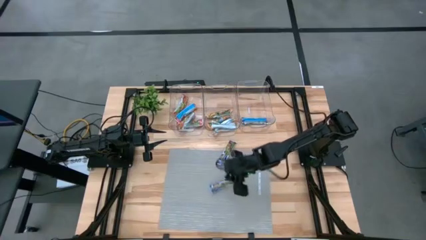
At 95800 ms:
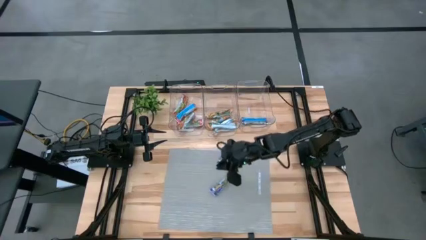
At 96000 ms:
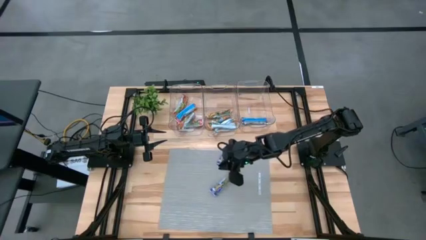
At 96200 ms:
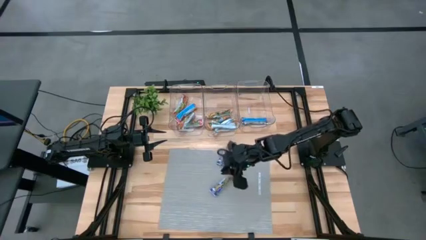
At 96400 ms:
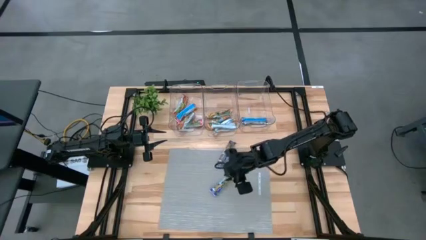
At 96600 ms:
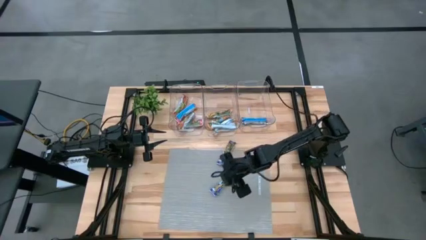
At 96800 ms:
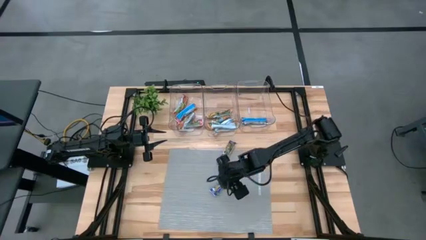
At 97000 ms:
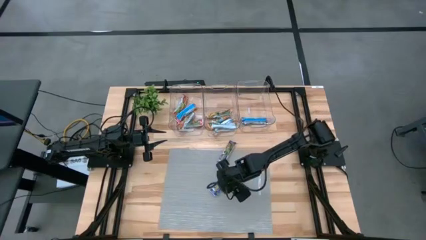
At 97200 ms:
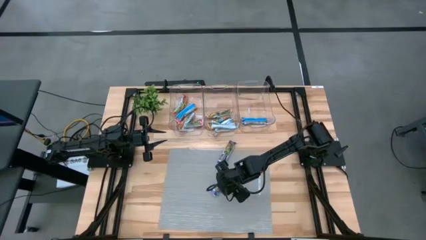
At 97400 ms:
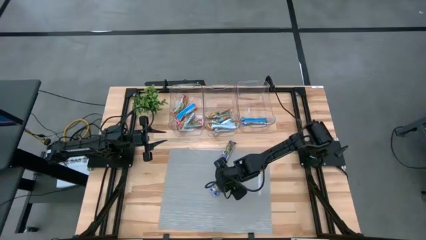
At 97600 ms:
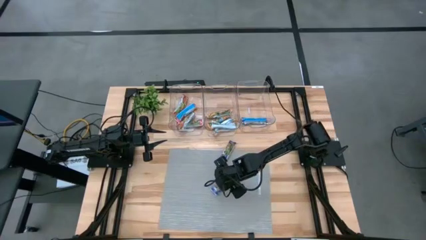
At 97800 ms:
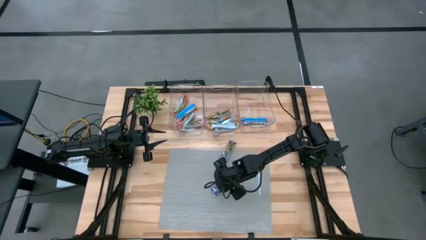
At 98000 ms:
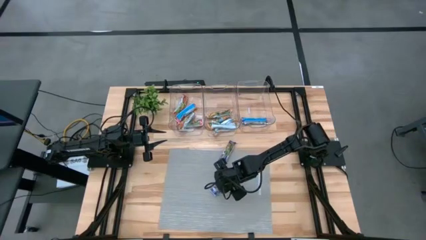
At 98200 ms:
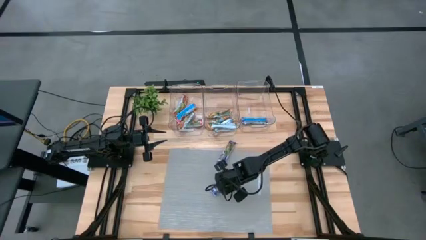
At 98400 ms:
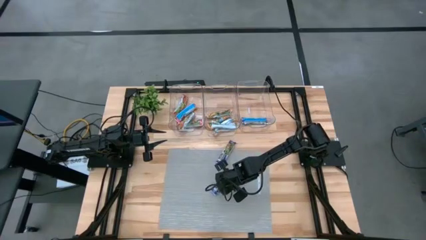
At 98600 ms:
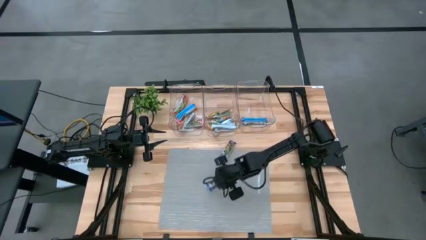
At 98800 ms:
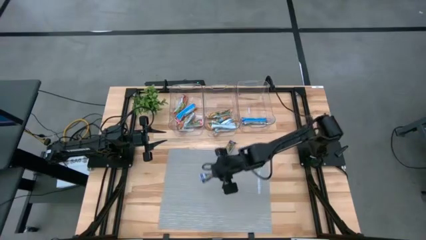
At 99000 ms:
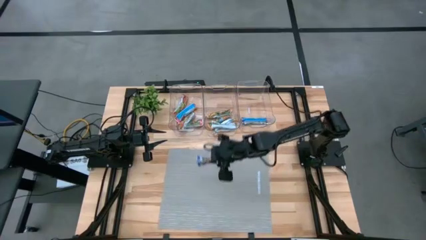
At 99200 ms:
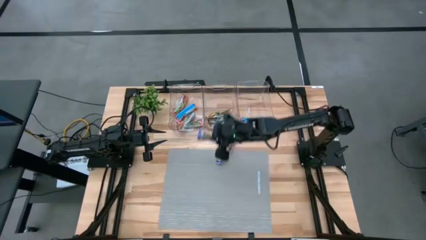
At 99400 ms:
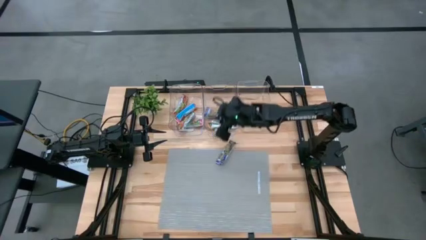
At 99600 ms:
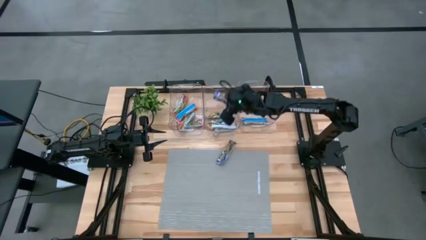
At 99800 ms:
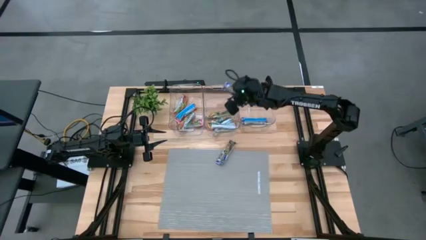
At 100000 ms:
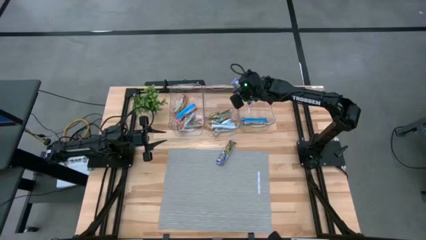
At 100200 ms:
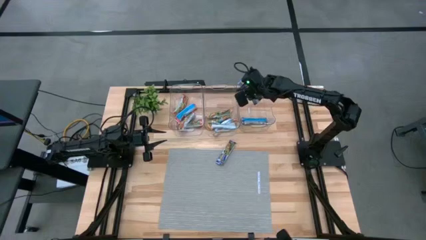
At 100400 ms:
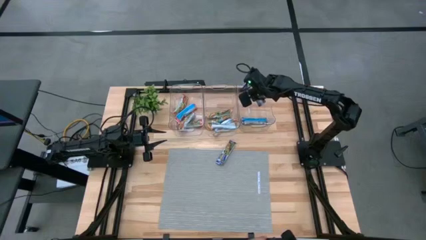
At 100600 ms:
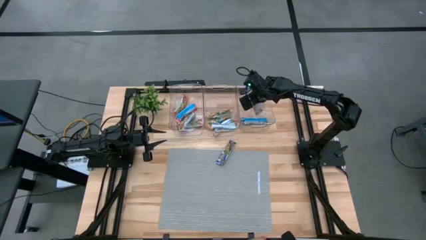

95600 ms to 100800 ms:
Task: Pick and place Granola Bars by type
Put the blue granola bar into the right transparent bin

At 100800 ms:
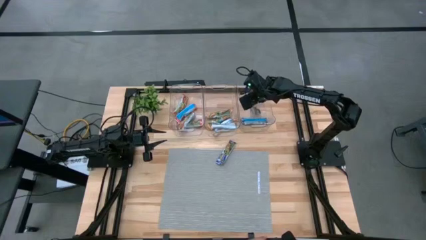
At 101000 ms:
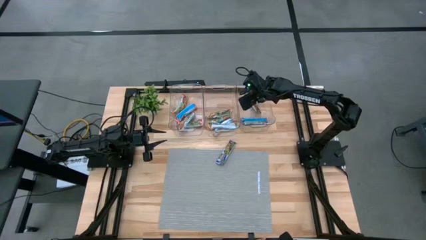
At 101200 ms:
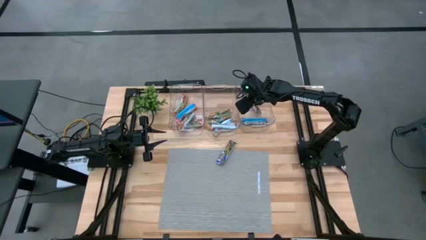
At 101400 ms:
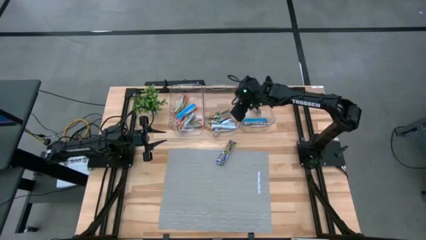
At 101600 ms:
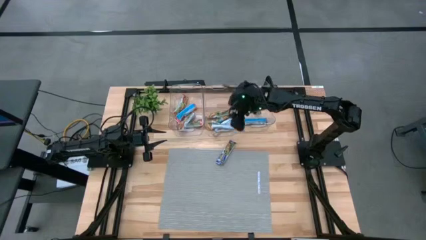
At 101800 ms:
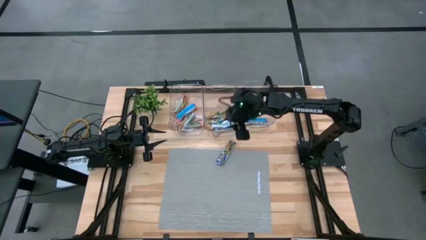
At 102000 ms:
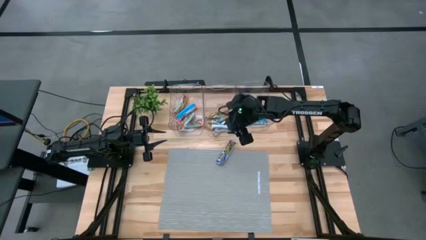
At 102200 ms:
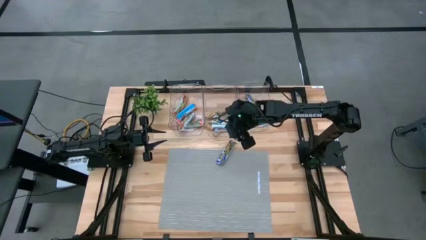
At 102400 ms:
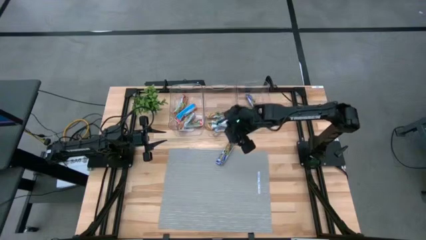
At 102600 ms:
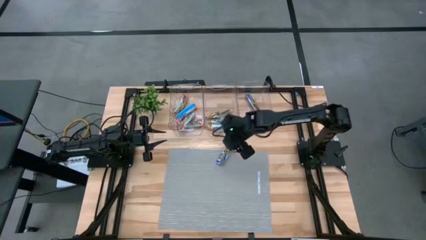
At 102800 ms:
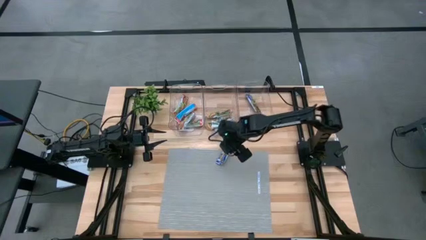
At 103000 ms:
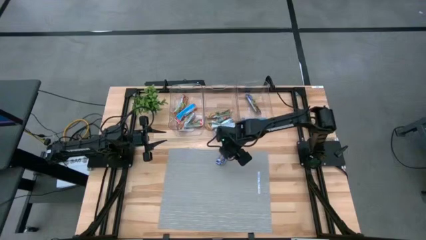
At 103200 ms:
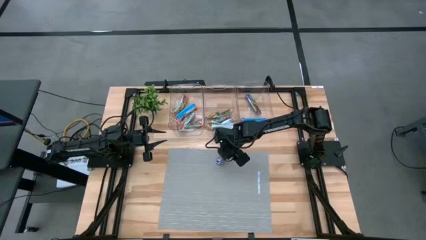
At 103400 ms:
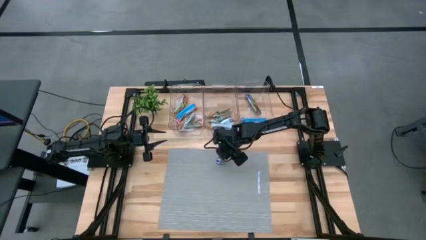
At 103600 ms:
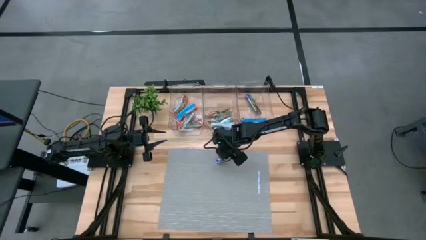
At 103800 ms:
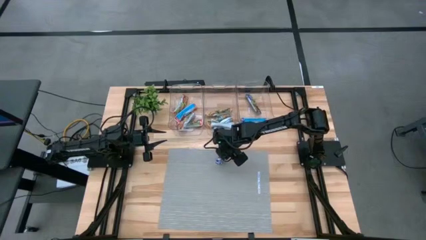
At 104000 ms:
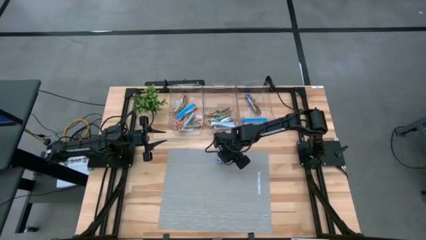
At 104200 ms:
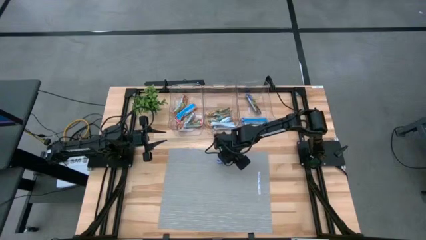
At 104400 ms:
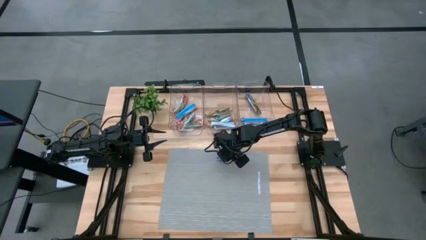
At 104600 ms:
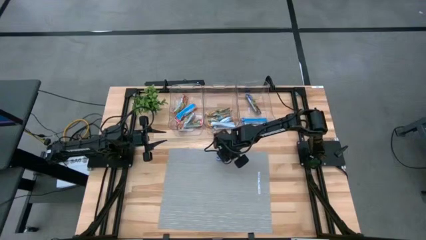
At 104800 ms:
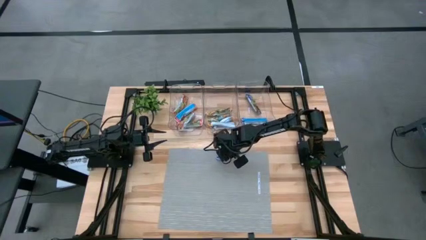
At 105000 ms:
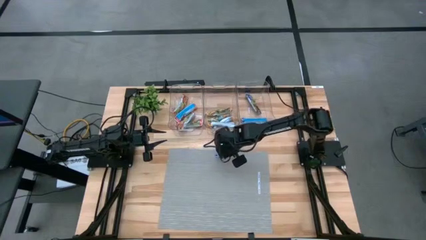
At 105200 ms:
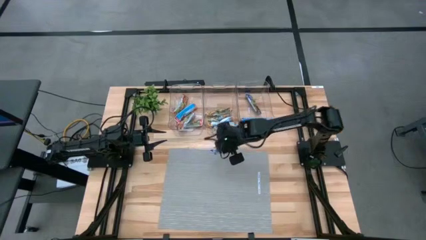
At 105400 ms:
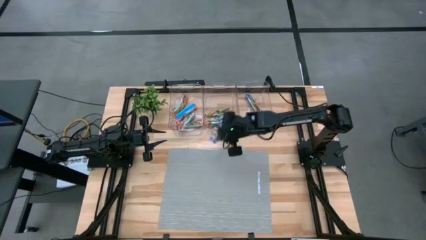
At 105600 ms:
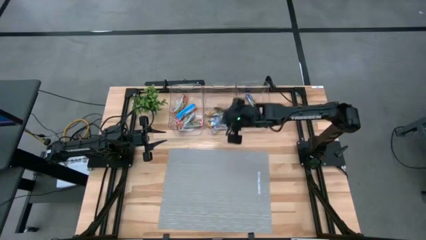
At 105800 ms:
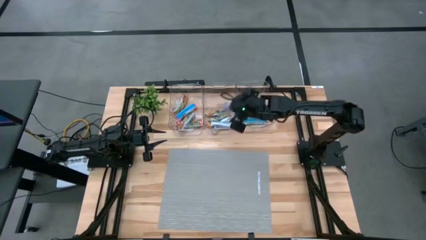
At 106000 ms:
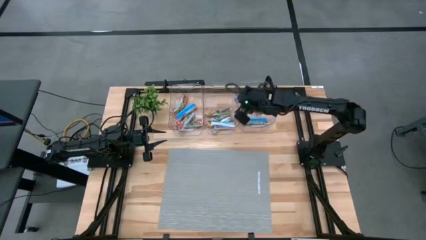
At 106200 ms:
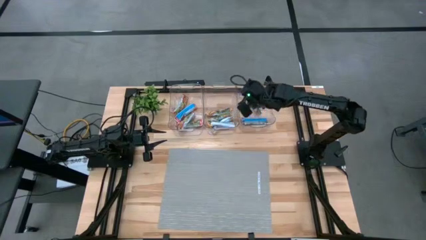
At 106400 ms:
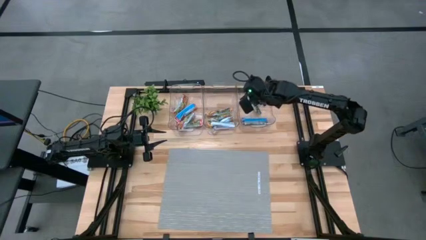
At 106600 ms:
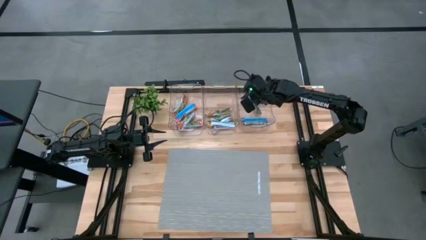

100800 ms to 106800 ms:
Put the blue granola bar into the right transparent bin

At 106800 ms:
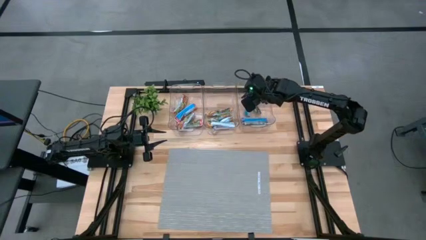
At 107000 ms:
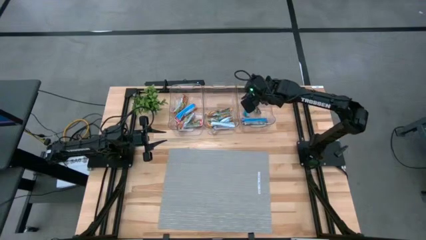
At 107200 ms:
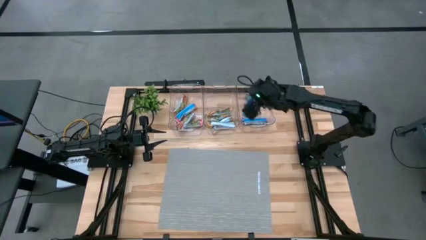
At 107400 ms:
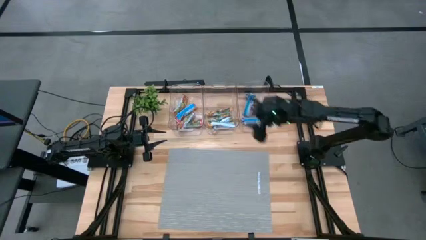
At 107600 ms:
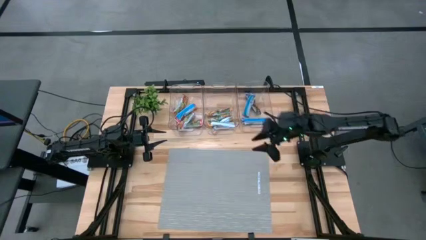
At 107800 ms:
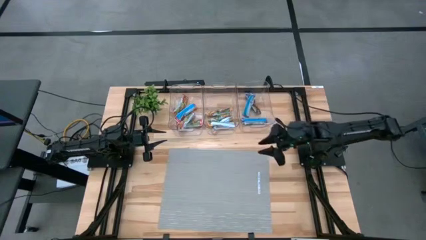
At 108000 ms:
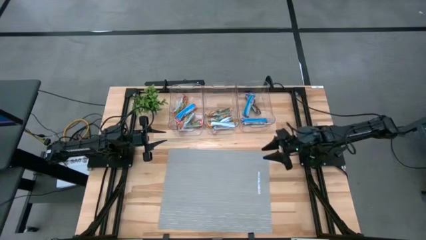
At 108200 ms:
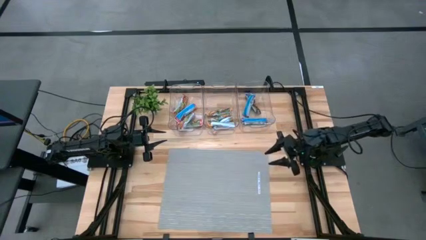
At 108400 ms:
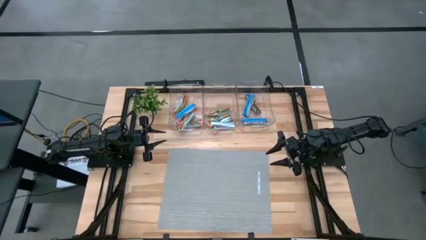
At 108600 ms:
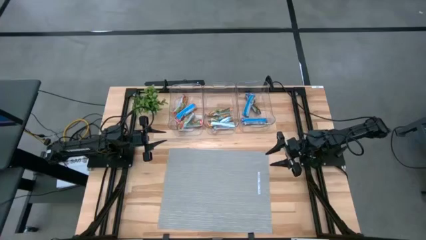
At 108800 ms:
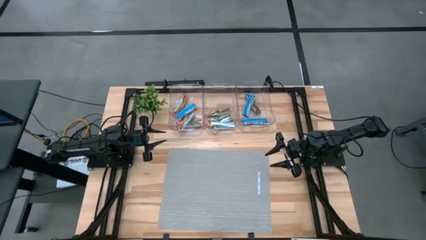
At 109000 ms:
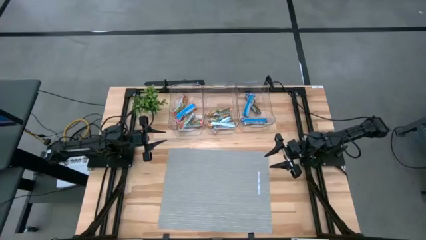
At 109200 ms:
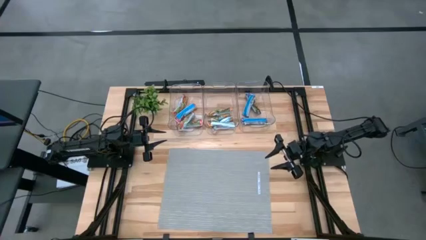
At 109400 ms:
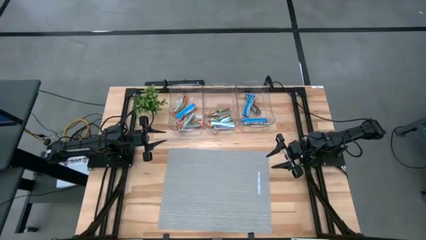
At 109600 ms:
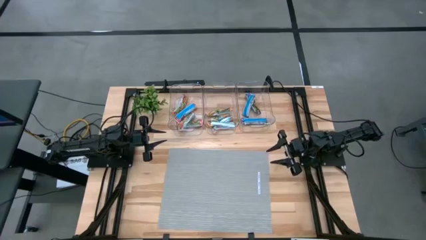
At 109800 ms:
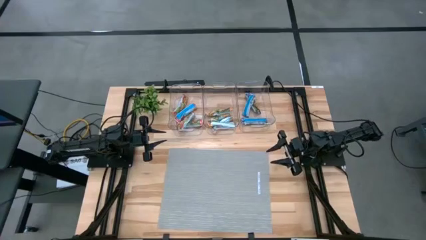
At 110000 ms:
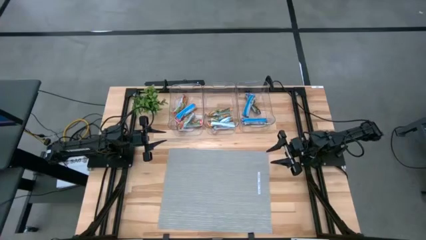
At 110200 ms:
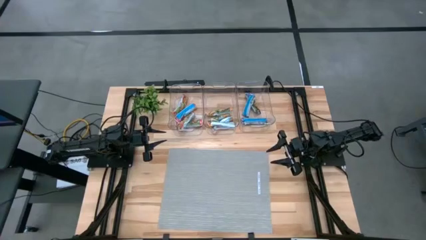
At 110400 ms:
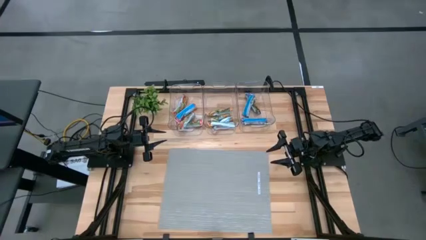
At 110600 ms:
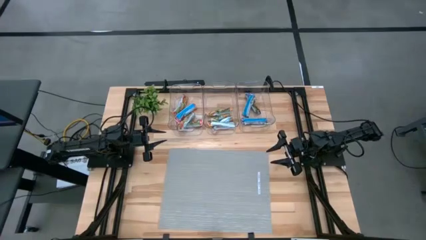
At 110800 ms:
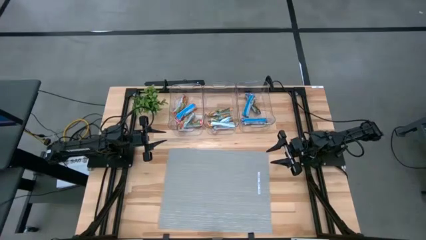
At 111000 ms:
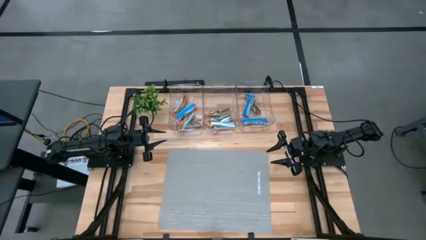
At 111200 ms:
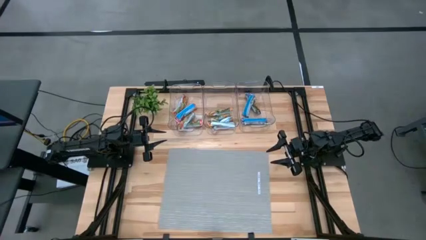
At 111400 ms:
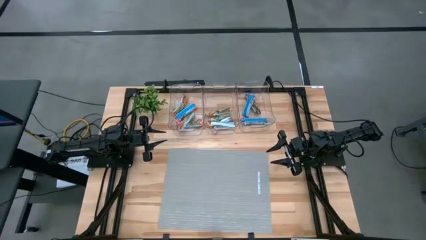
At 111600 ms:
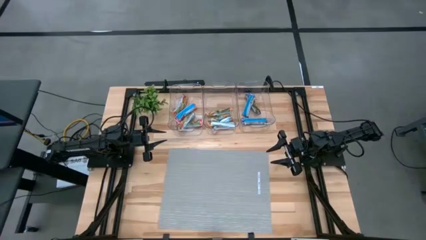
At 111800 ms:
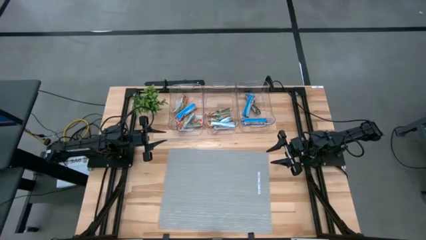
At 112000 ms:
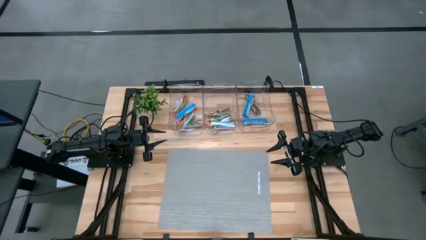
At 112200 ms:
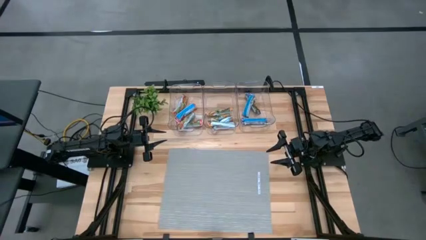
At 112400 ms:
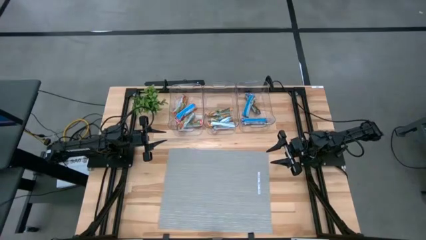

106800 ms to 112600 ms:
Return to Home Position
